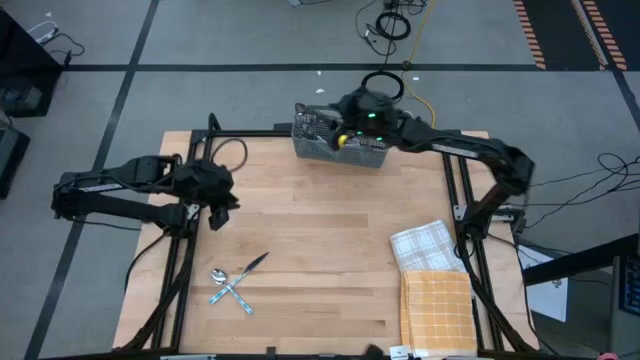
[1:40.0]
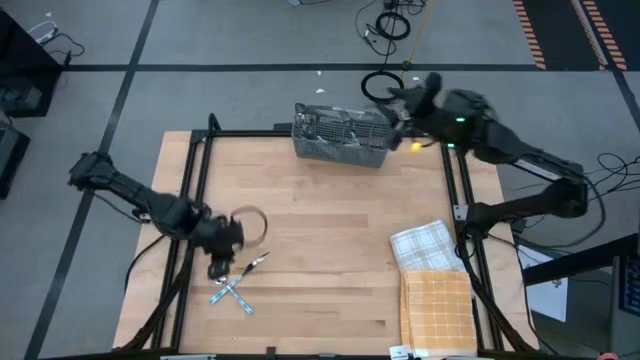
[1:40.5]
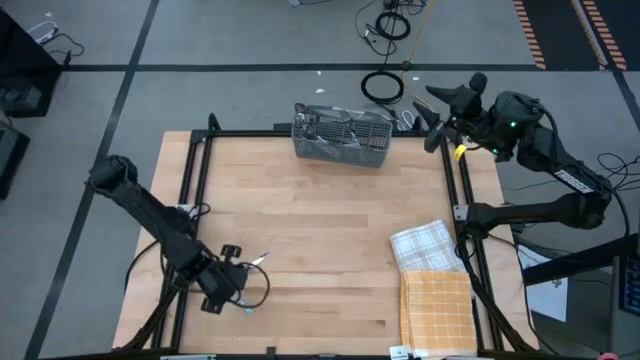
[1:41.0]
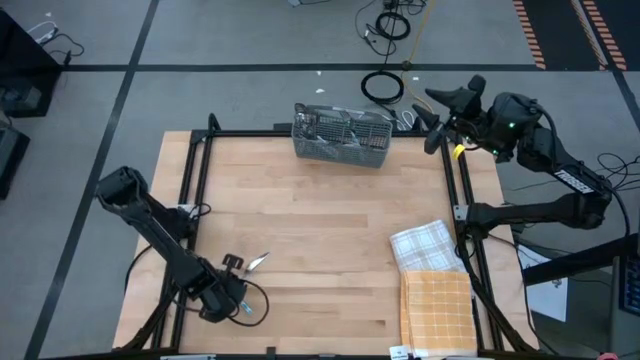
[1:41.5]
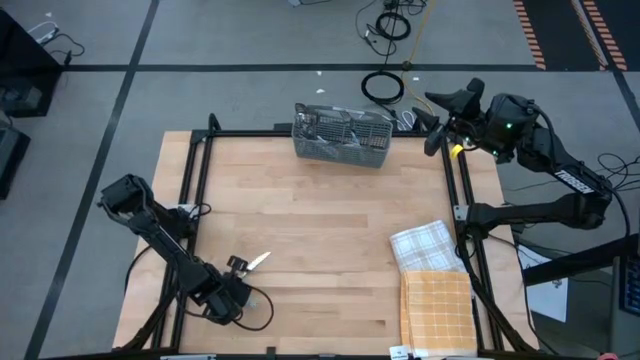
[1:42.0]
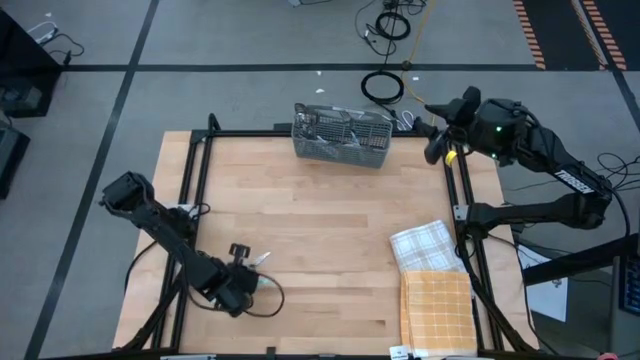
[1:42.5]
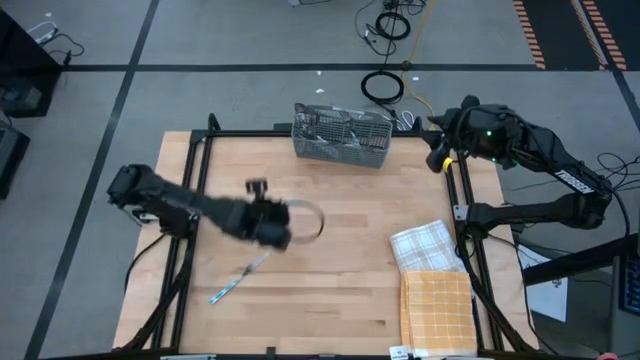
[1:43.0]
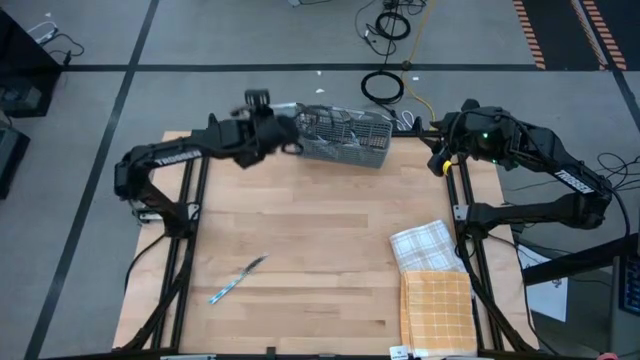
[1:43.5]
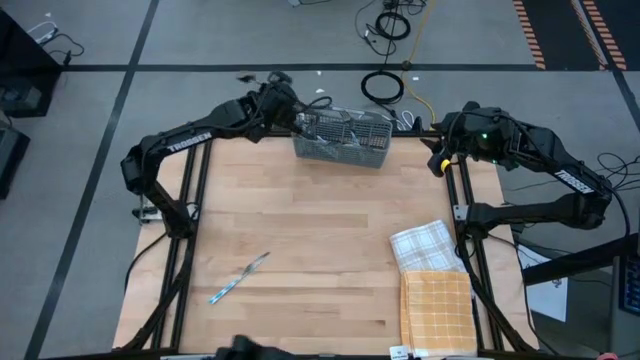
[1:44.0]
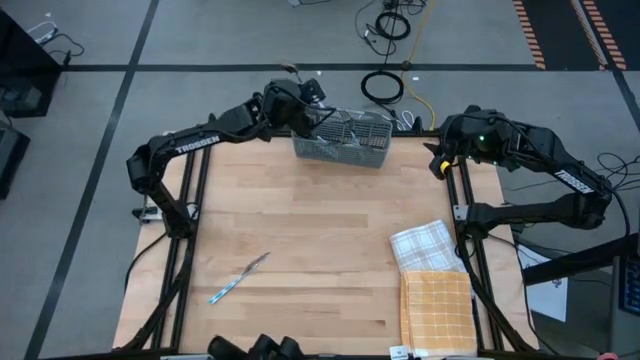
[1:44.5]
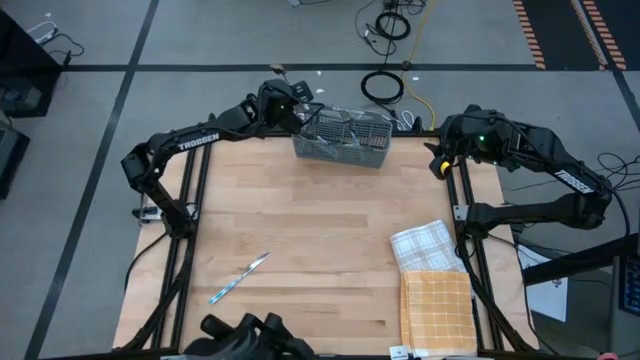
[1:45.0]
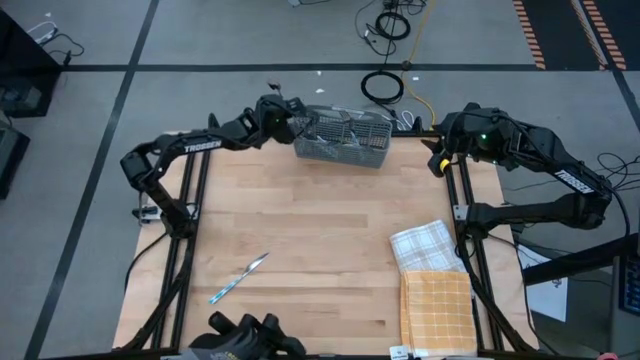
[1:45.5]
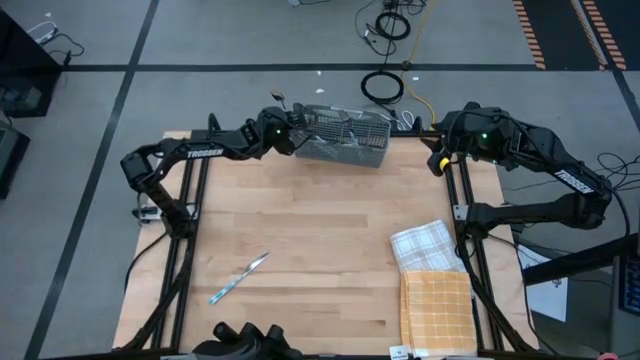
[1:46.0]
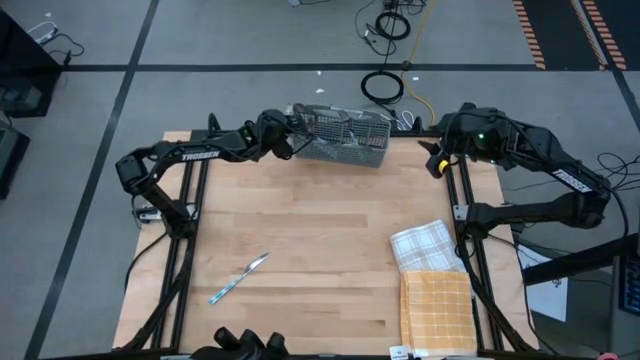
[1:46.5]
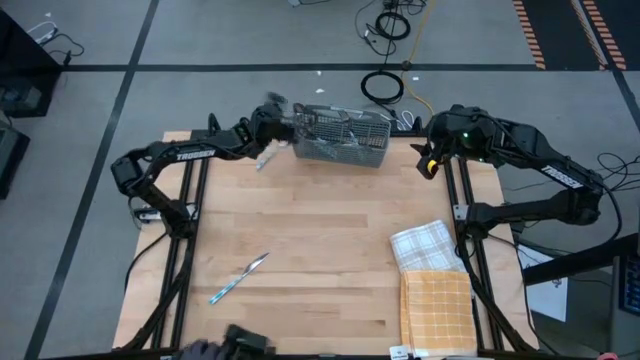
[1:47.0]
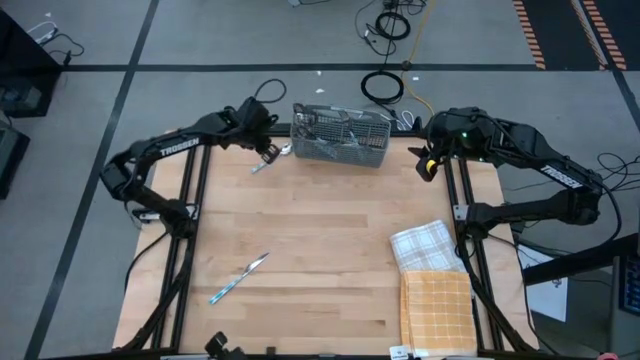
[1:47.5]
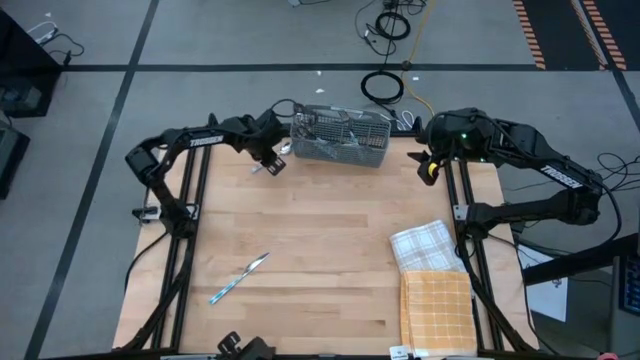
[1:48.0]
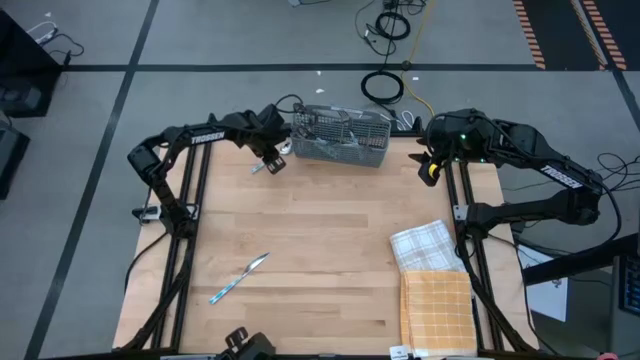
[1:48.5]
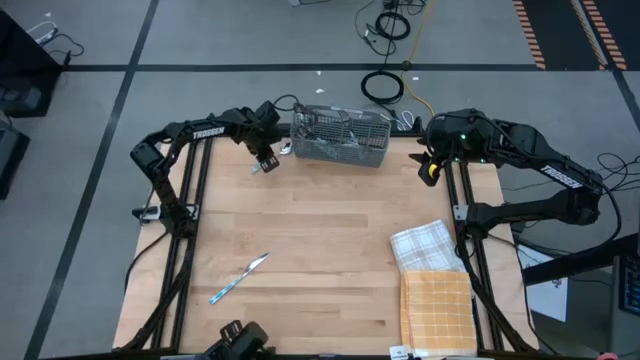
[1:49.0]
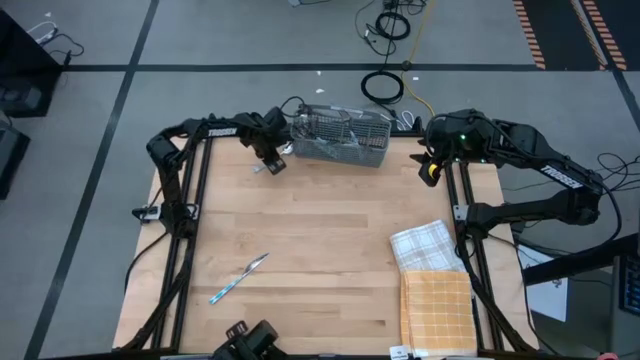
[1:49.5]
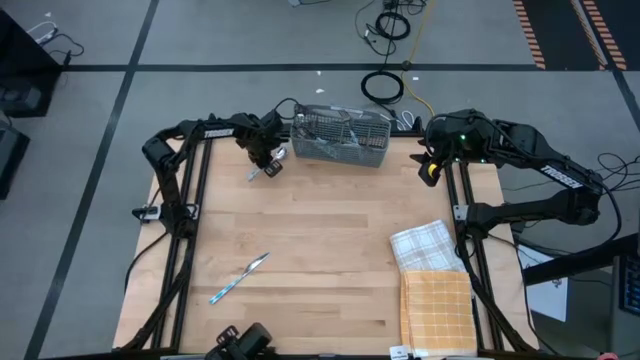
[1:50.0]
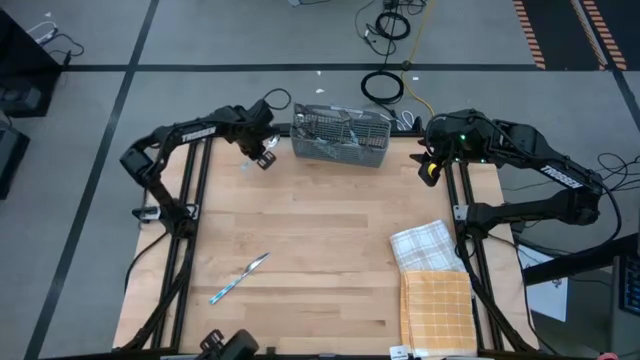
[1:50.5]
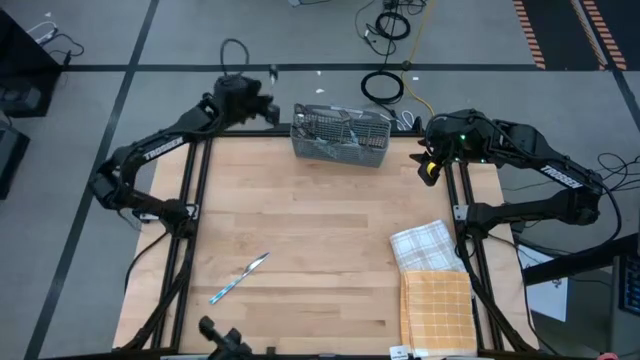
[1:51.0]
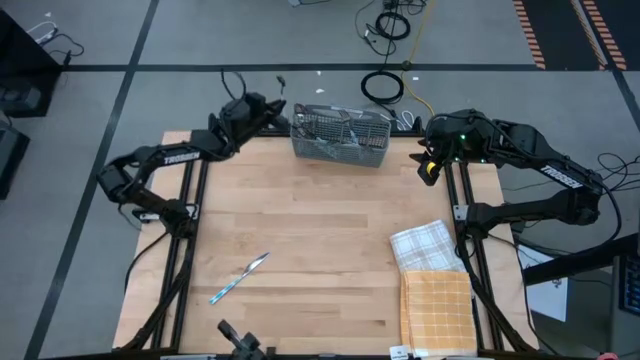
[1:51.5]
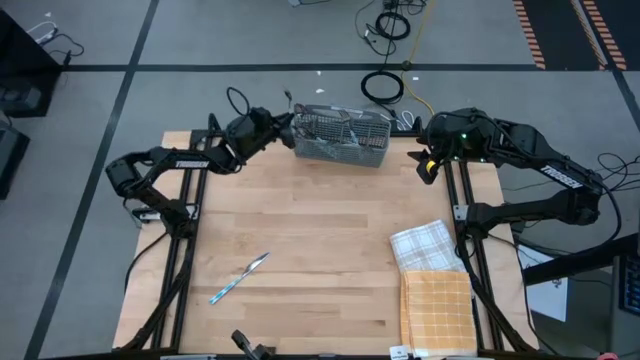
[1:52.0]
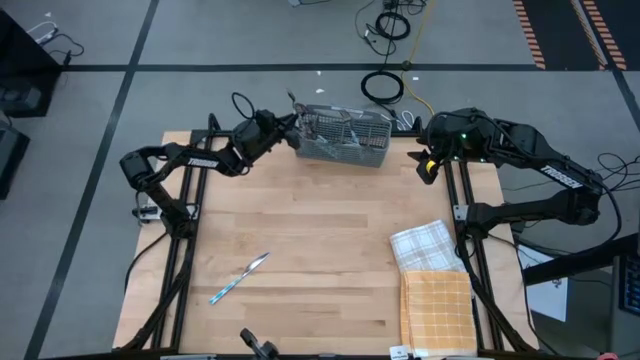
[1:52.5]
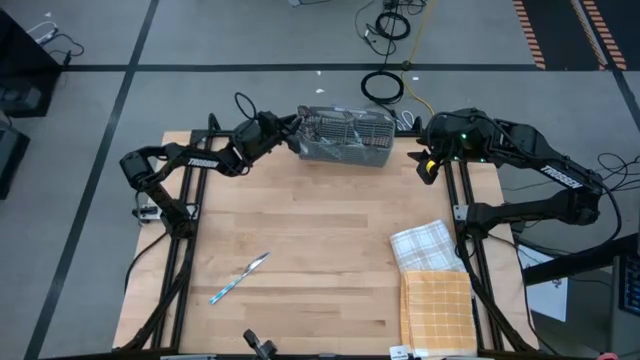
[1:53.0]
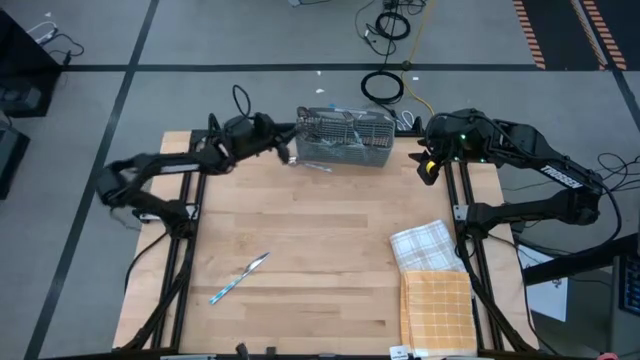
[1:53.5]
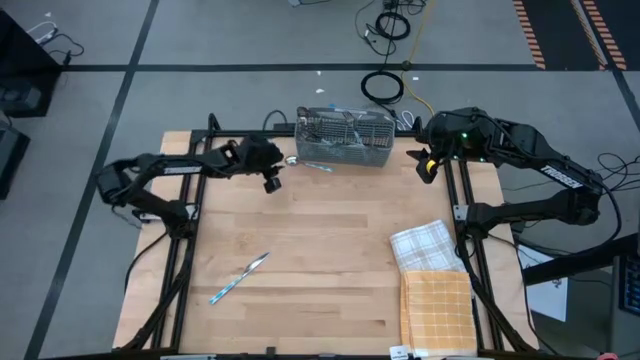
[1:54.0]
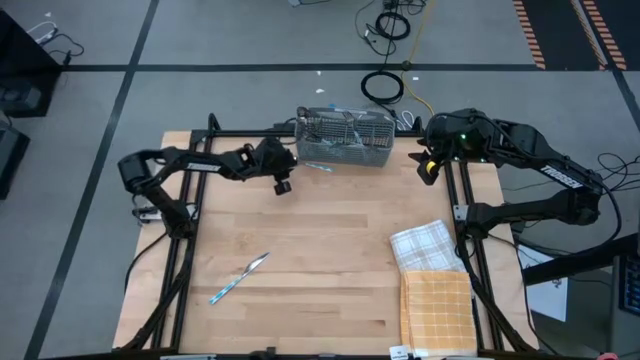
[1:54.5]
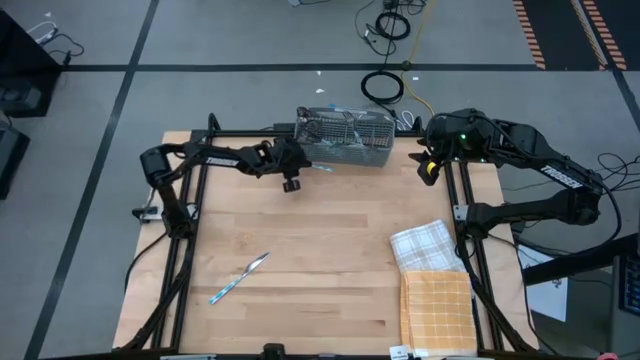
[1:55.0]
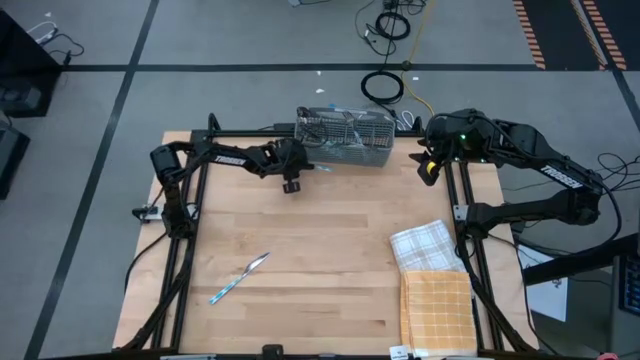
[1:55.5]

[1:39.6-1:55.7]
Task: Sort silverware
Put the blue spoon into the gray silverware basket

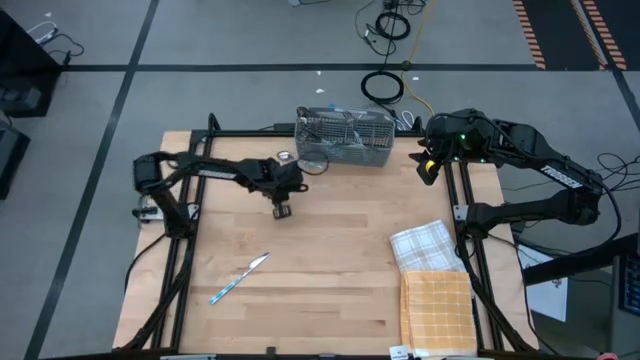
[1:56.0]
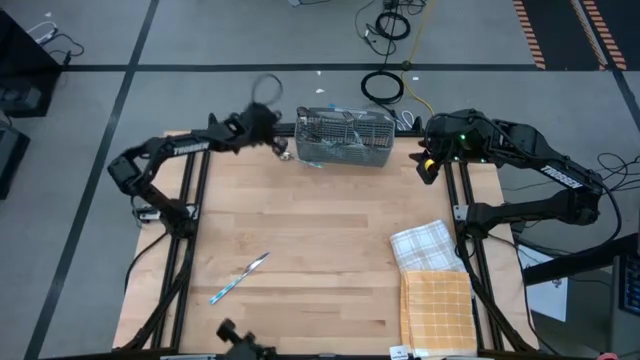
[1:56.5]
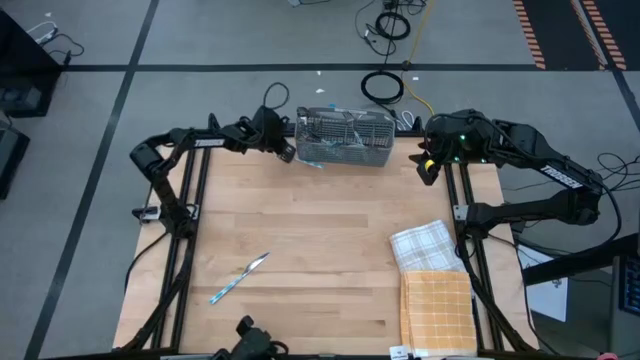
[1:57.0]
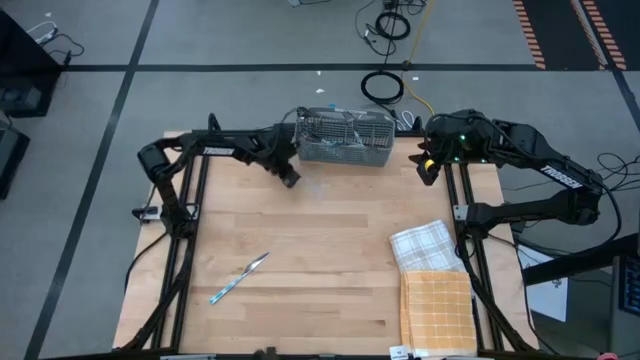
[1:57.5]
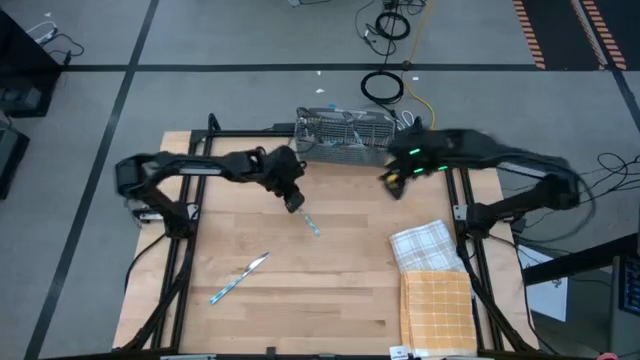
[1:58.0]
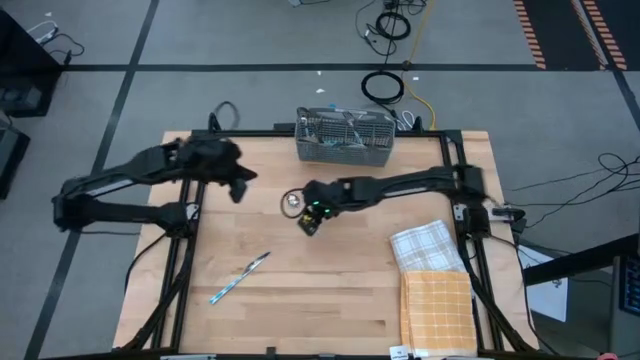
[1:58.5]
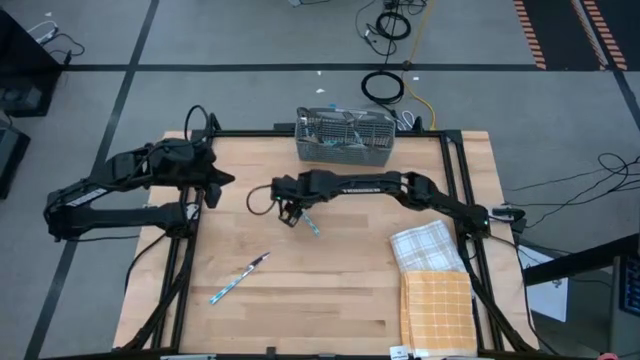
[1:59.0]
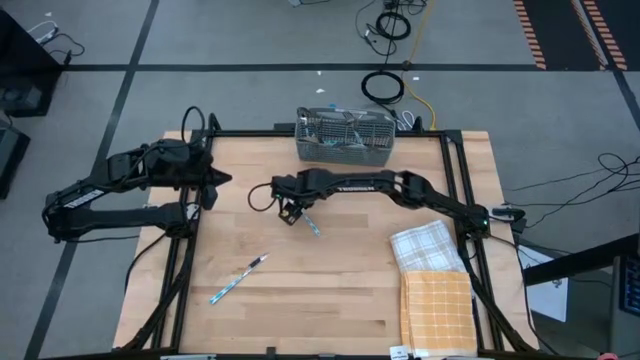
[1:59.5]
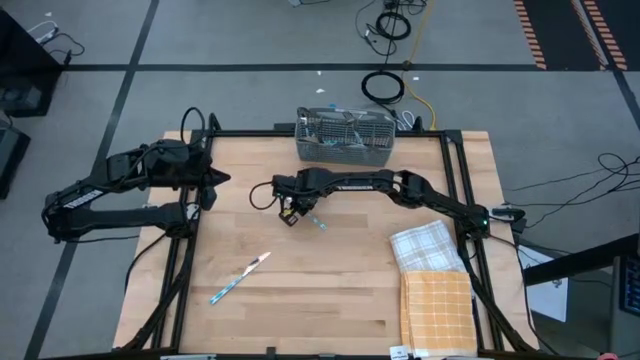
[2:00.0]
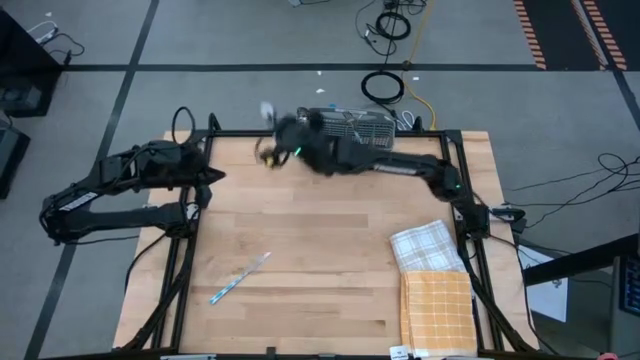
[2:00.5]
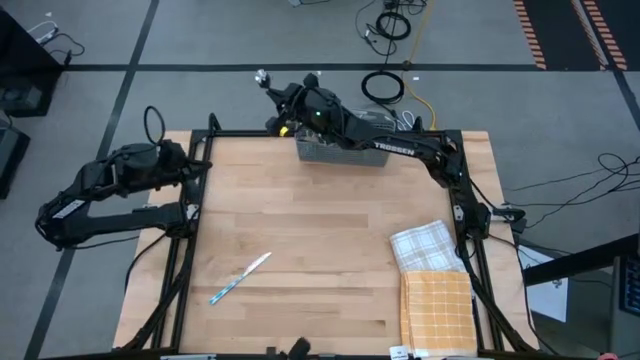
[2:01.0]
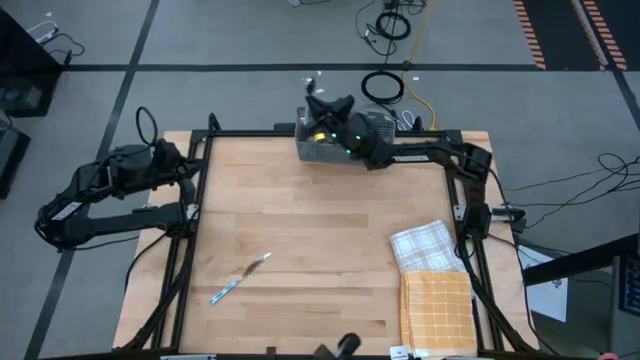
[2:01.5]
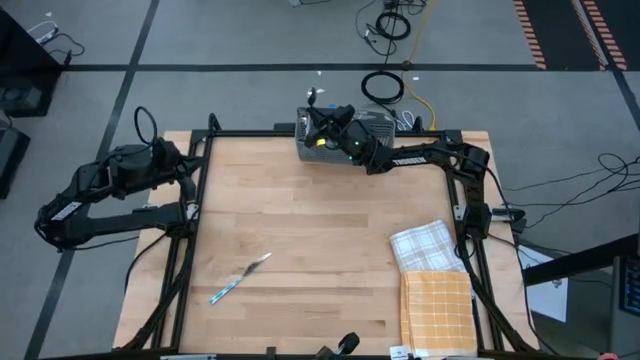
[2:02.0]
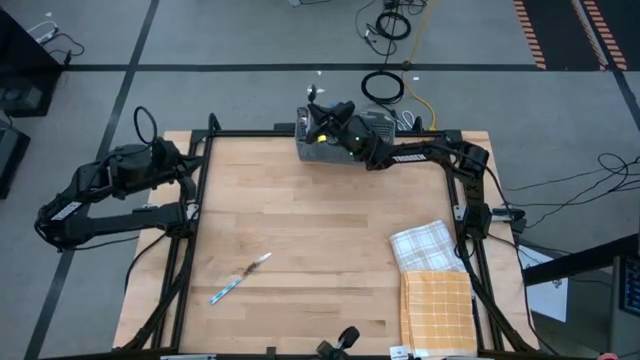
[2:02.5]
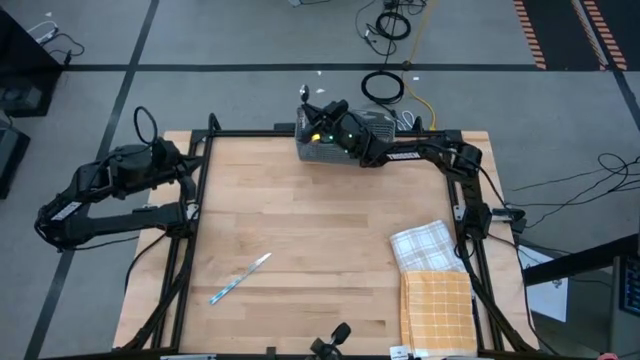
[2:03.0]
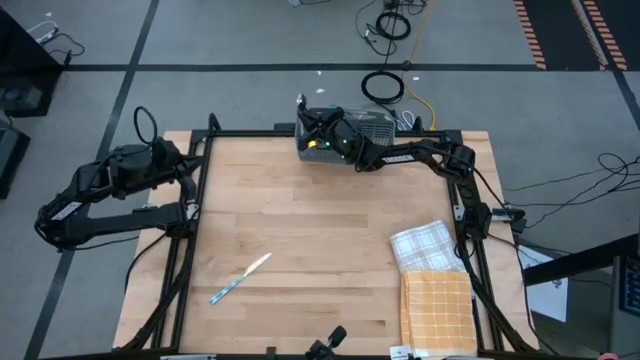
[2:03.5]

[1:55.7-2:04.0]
Put the blue spoon into the gray silverware basket
